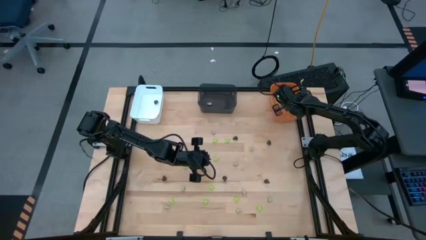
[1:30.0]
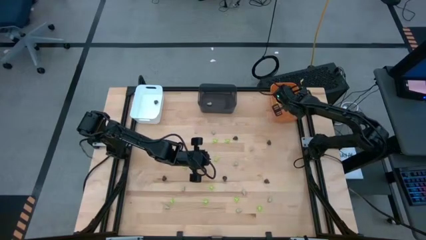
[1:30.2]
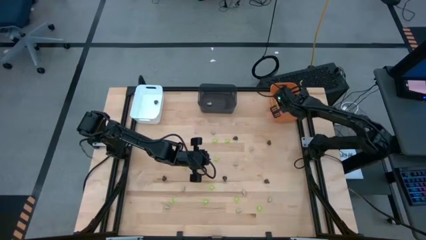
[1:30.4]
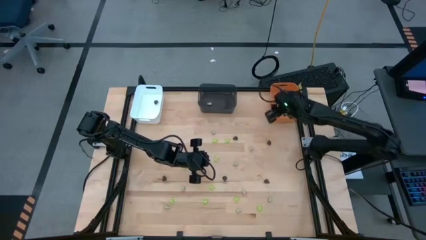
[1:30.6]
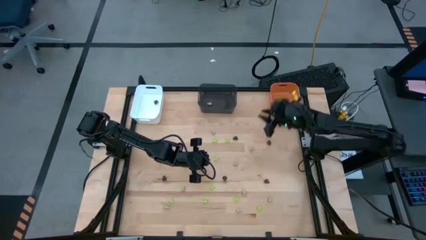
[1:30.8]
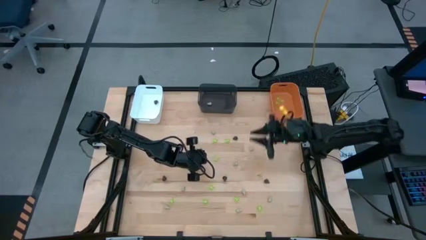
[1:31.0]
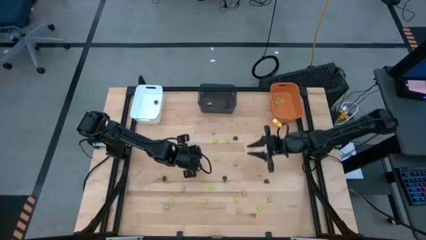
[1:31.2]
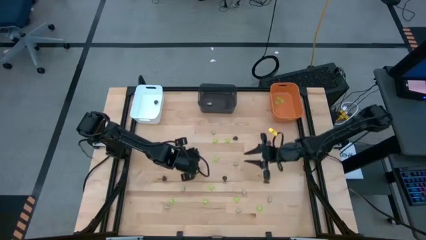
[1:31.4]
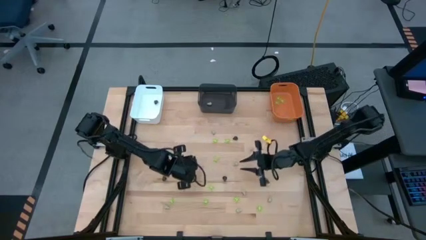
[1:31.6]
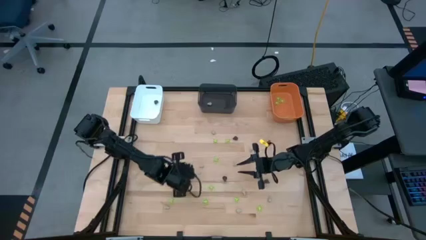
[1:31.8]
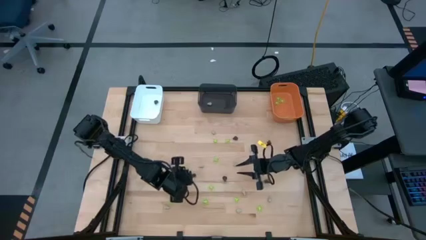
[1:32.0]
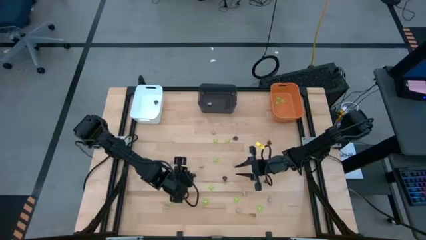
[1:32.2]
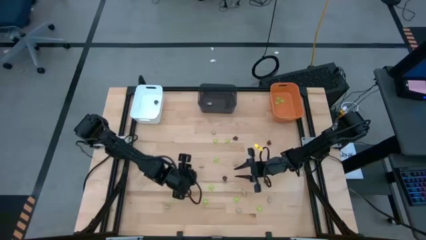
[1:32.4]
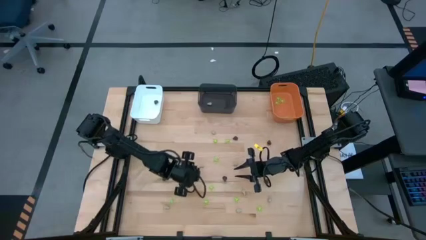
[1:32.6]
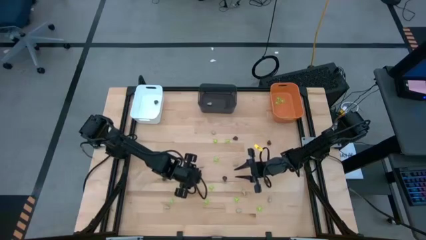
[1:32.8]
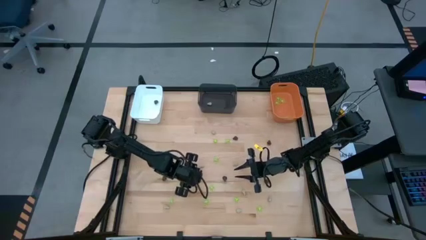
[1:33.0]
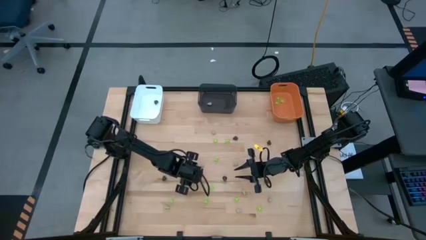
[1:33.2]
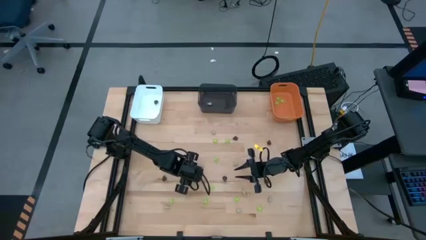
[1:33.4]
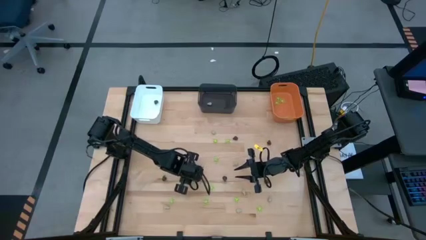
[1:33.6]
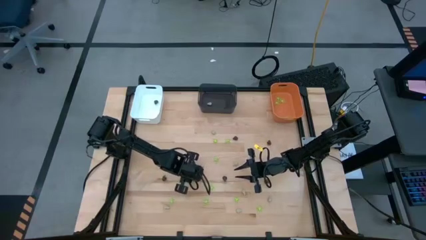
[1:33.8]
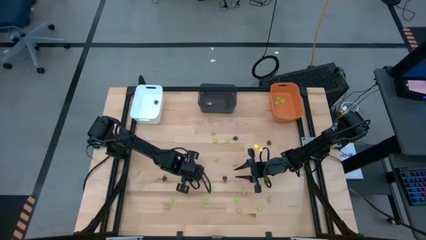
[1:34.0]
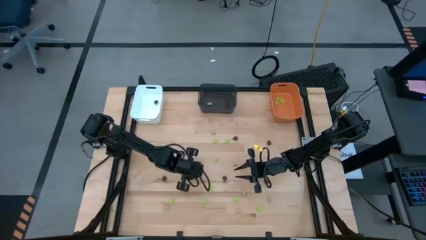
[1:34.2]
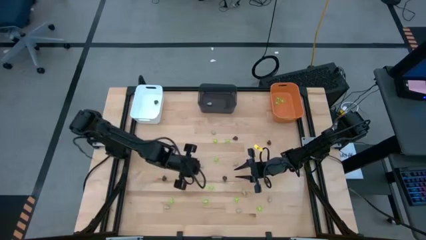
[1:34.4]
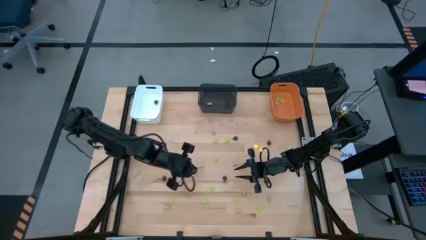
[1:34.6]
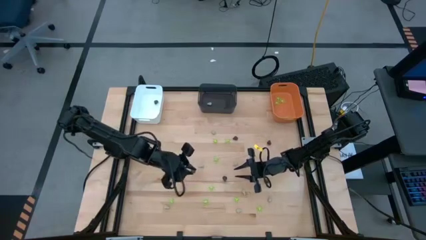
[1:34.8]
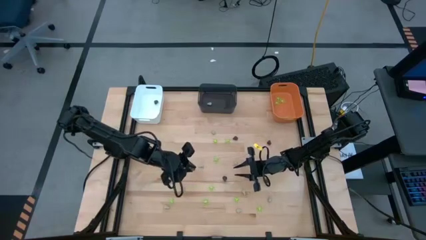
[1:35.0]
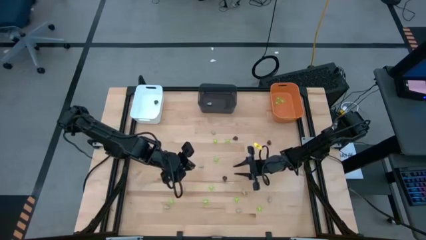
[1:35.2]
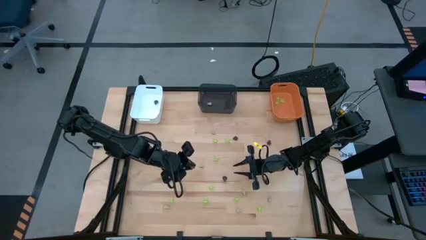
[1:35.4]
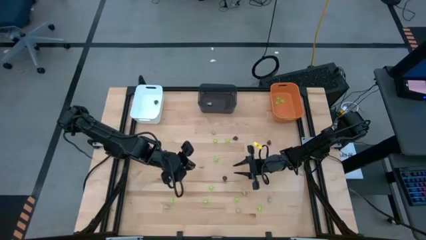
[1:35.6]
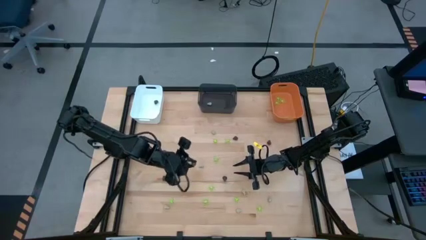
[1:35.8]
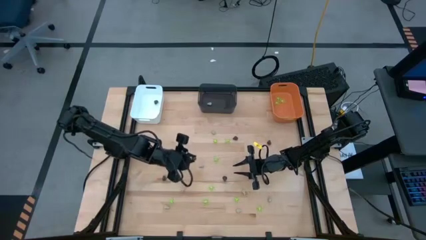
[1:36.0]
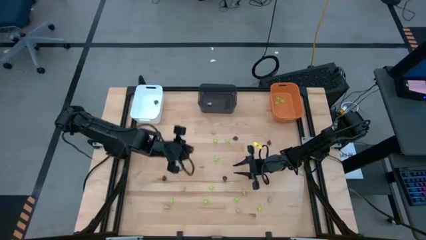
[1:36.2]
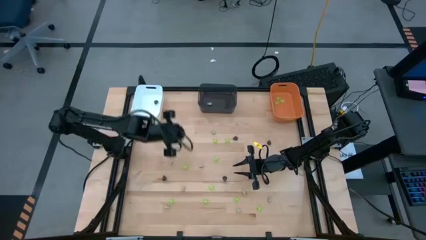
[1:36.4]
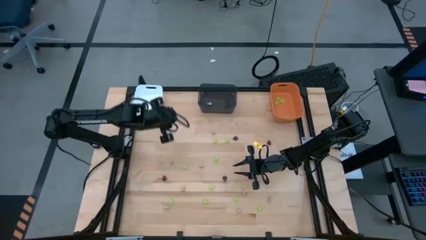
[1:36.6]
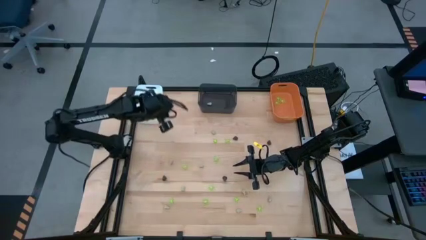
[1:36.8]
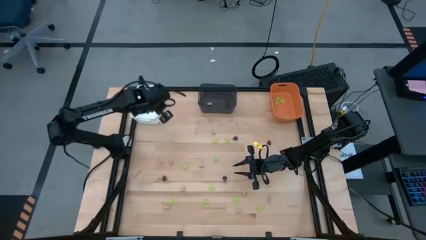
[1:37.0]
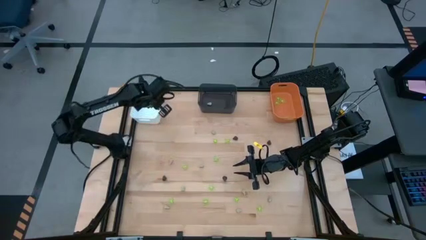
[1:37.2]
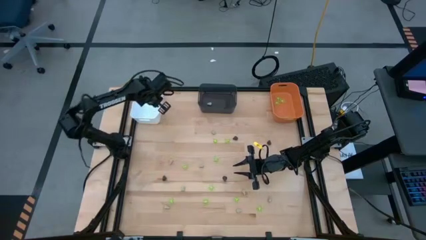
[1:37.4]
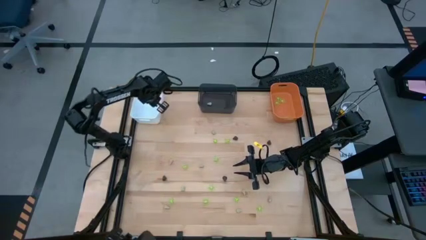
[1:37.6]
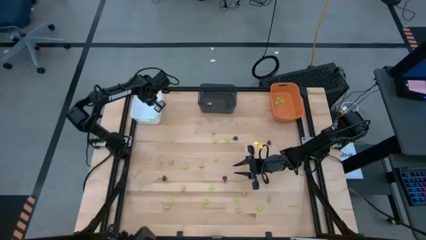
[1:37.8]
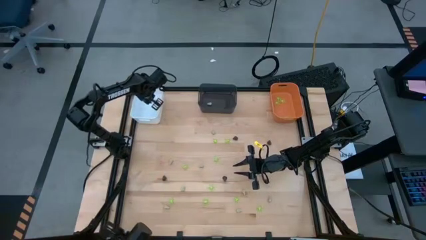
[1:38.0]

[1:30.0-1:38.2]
Task: Sort Halloween decoration
Put the black toy skull into the white bin

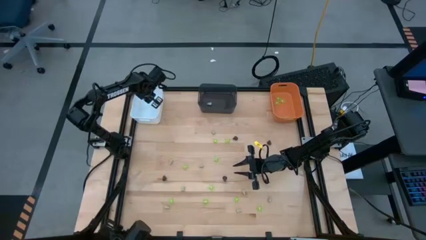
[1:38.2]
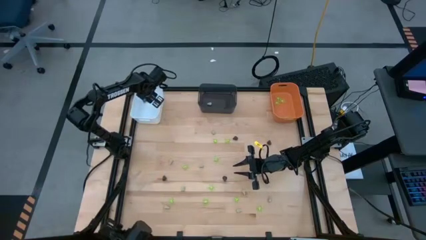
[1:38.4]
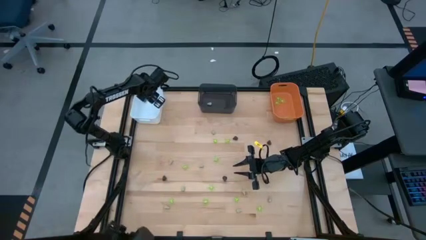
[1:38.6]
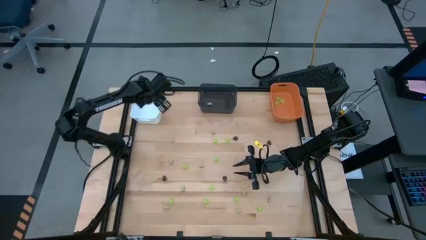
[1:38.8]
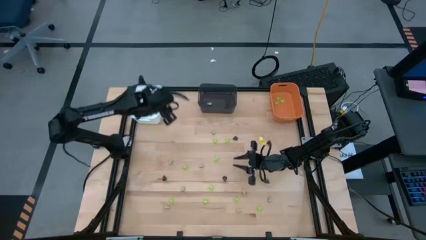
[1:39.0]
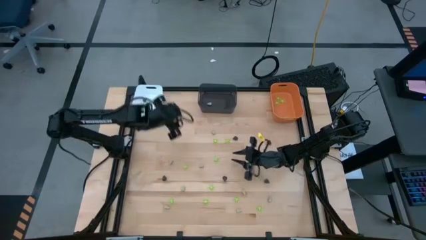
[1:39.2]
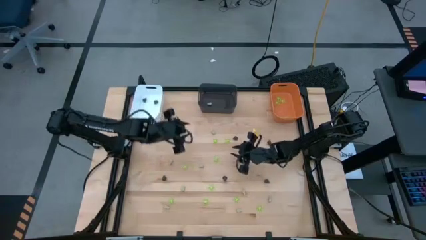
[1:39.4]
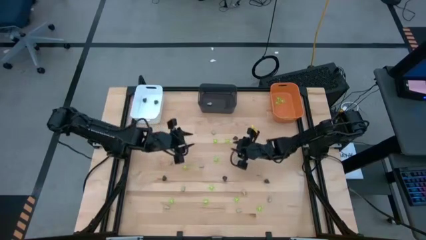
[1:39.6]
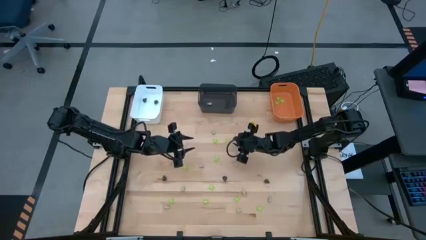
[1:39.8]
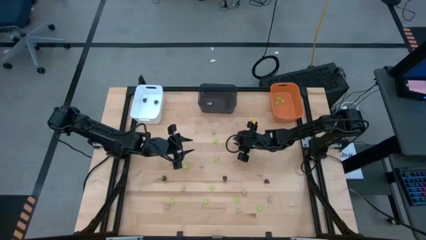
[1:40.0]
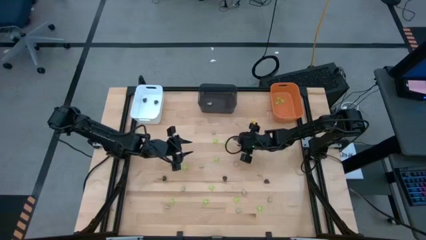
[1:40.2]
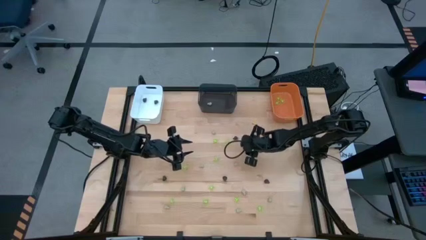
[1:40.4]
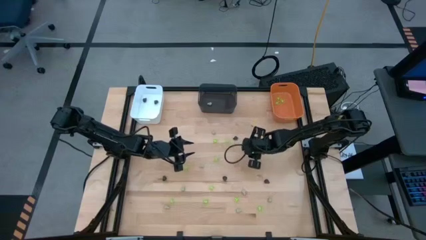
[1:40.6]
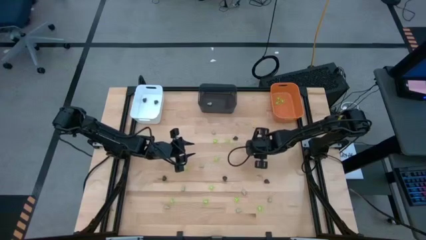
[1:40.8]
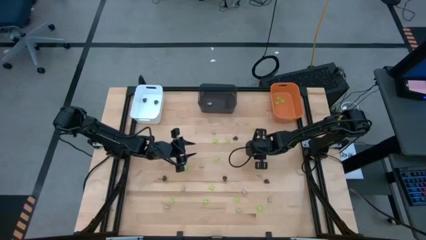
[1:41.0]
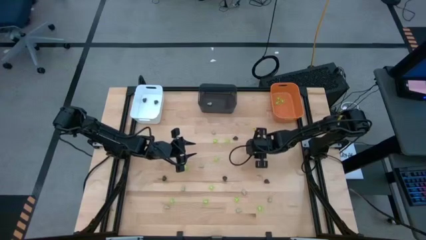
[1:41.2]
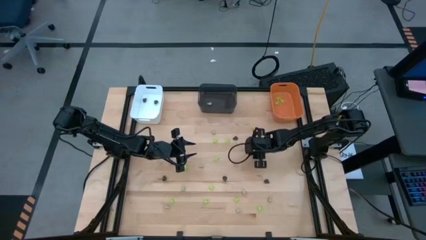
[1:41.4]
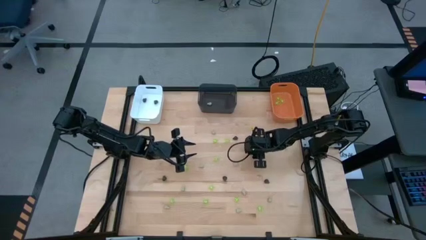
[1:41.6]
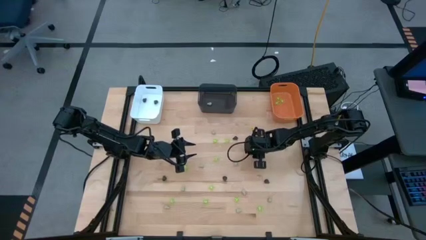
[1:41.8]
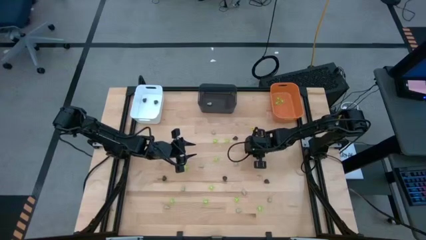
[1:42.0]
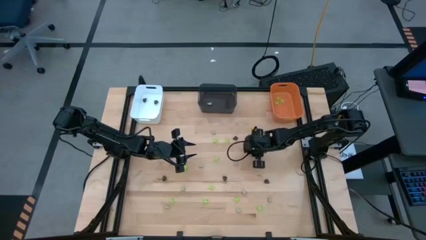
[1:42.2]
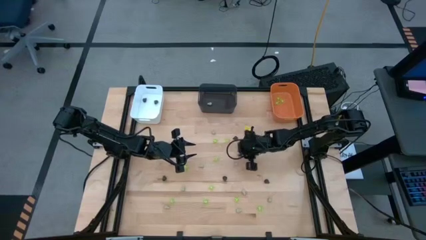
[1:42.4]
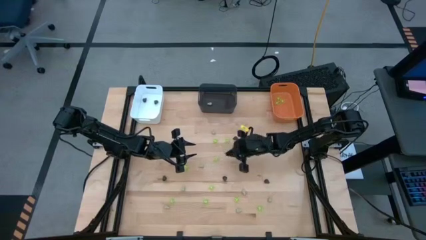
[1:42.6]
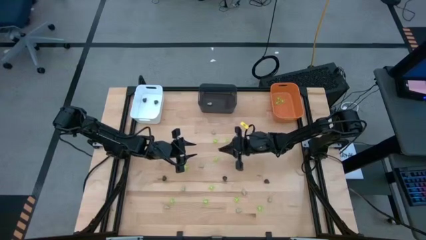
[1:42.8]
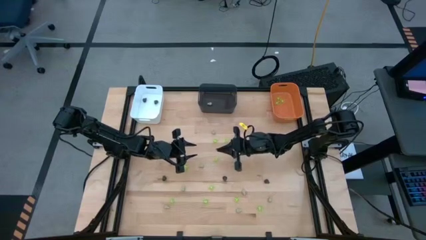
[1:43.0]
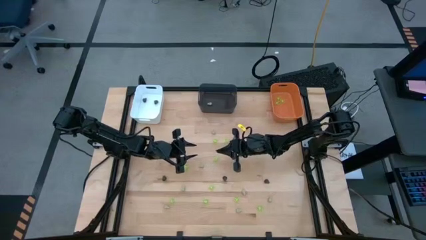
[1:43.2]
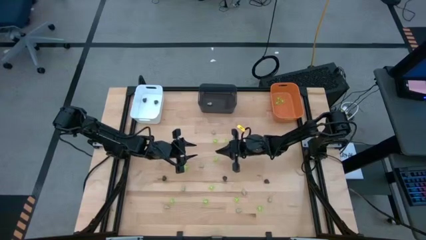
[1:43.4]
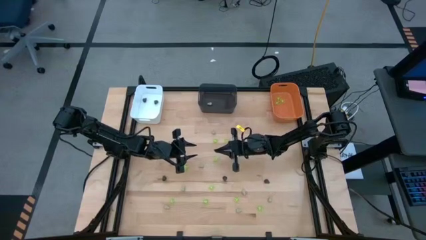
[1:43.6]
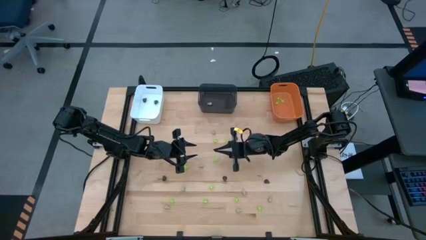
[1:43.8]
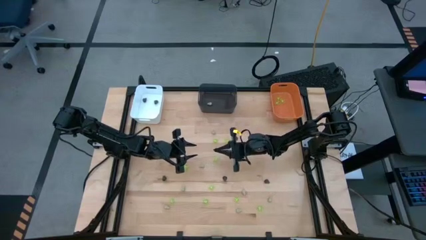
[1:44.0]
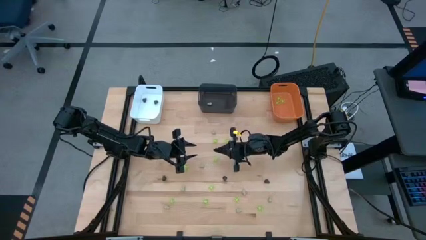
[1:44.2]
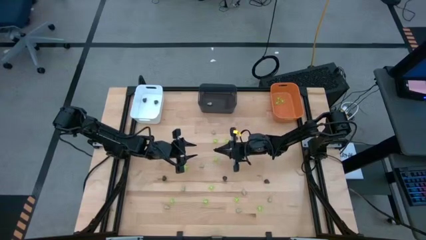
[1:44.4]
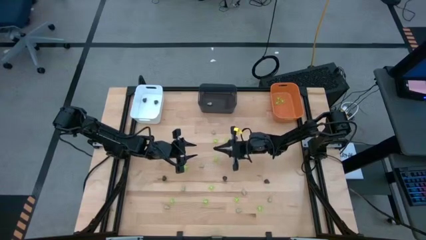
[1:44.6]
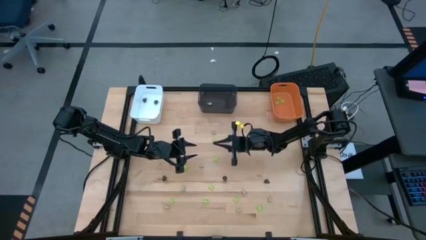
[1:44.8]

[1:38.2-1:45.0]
Put the white toy skull into the black bin
